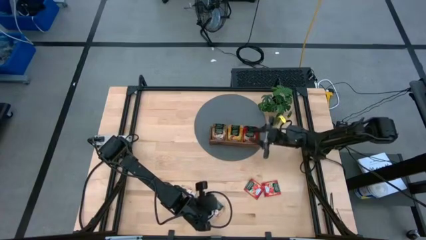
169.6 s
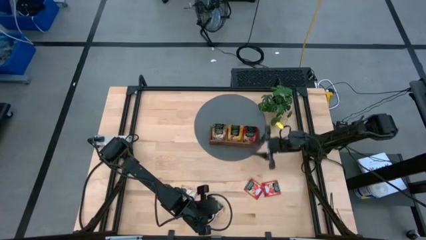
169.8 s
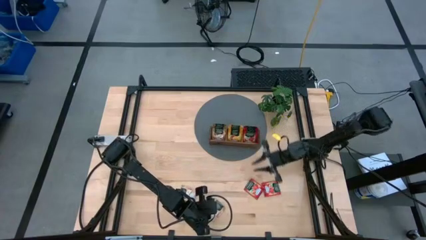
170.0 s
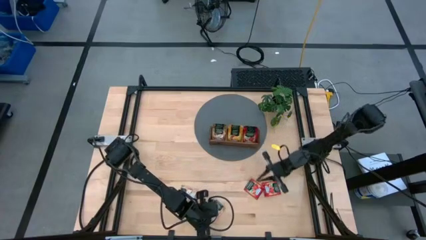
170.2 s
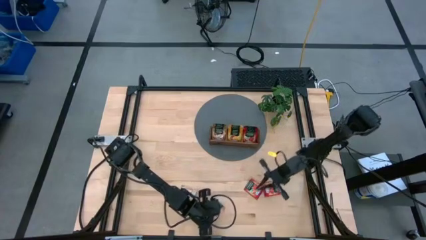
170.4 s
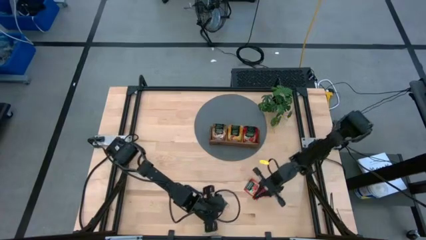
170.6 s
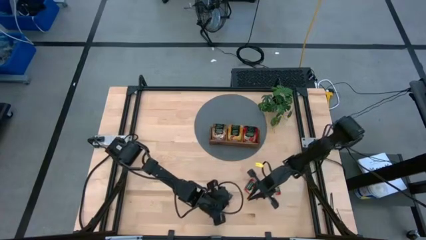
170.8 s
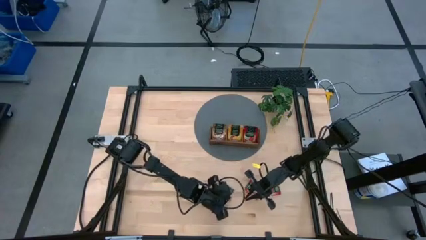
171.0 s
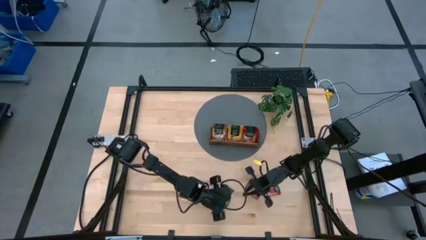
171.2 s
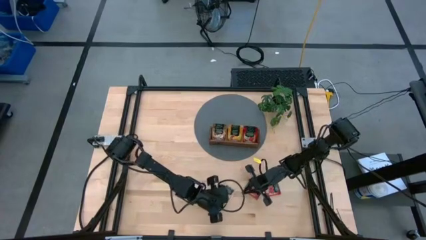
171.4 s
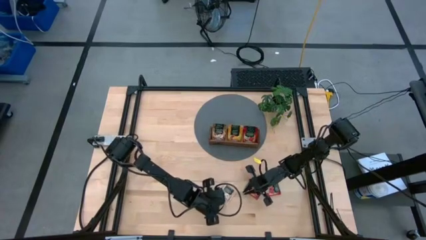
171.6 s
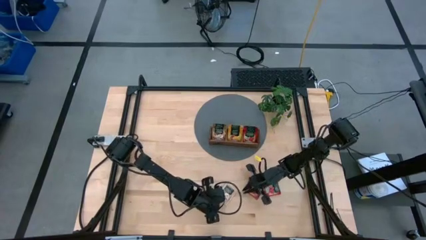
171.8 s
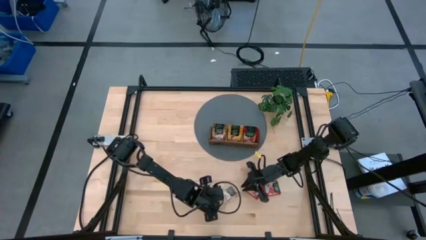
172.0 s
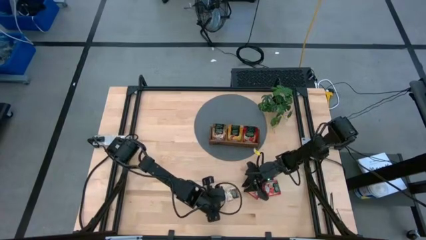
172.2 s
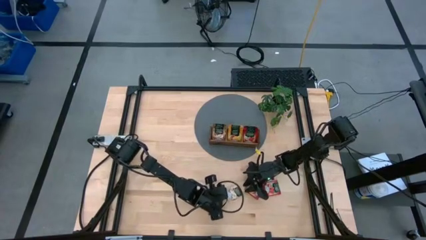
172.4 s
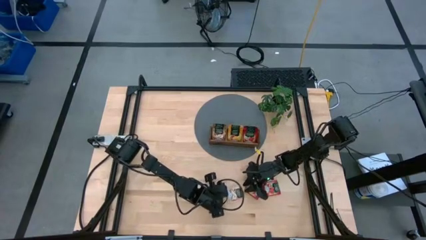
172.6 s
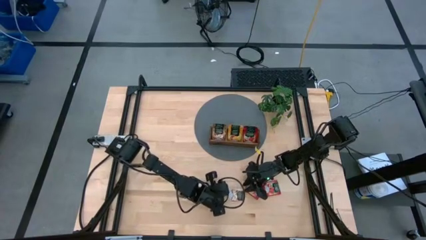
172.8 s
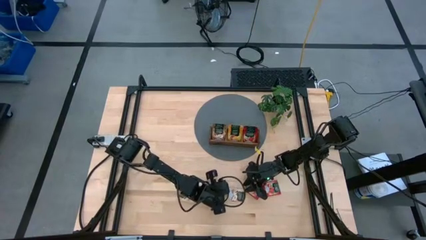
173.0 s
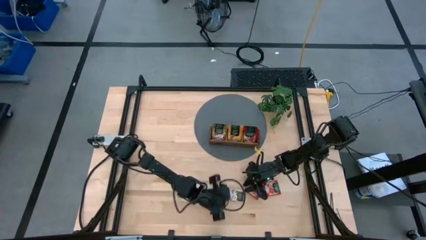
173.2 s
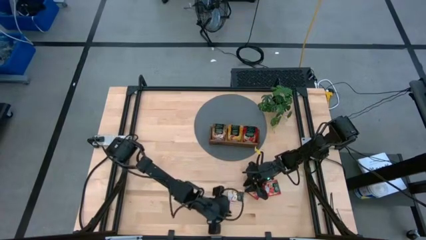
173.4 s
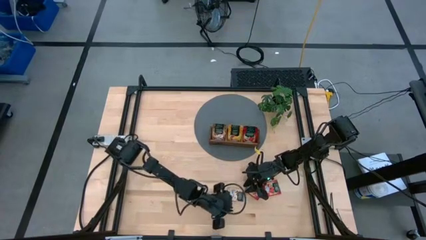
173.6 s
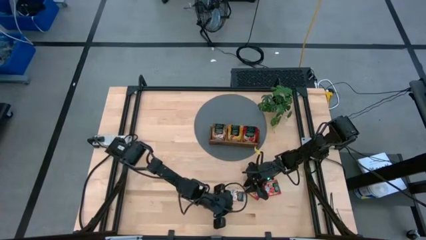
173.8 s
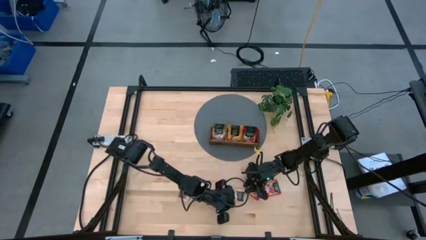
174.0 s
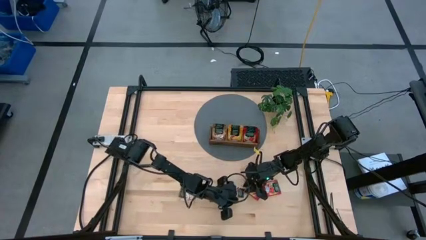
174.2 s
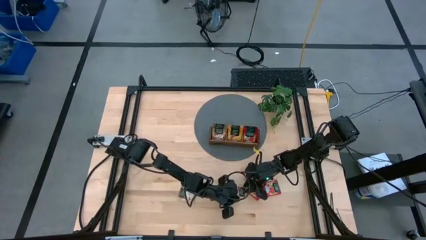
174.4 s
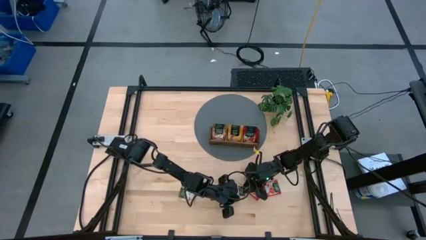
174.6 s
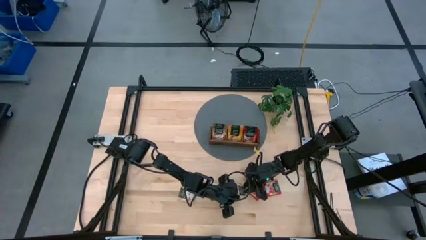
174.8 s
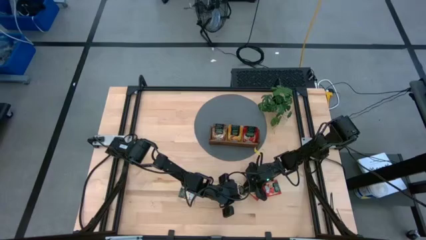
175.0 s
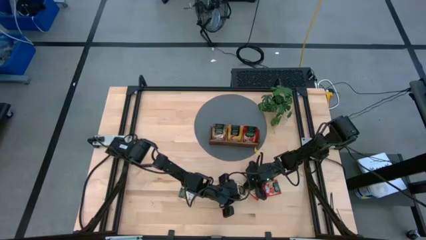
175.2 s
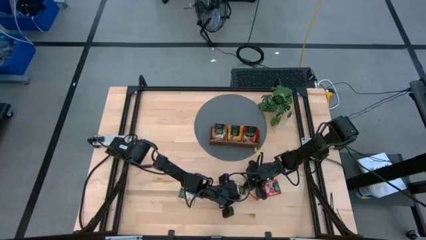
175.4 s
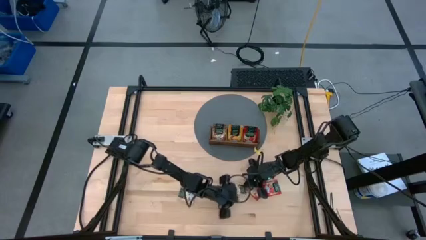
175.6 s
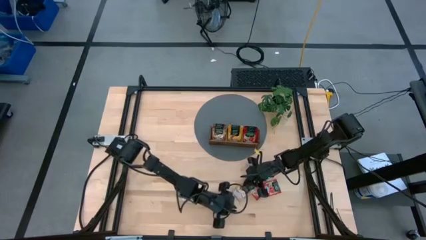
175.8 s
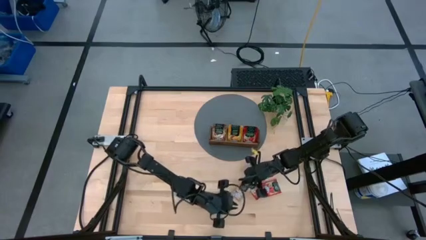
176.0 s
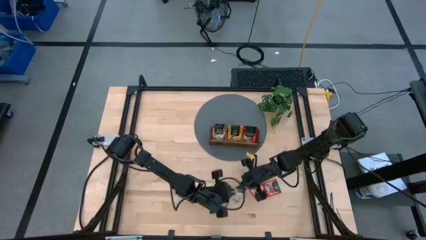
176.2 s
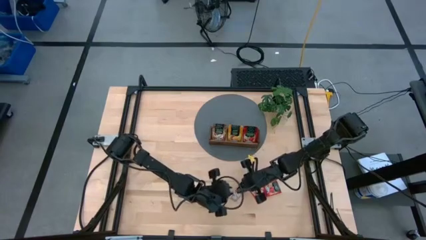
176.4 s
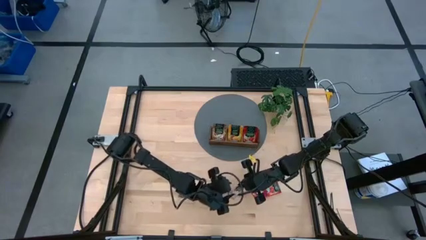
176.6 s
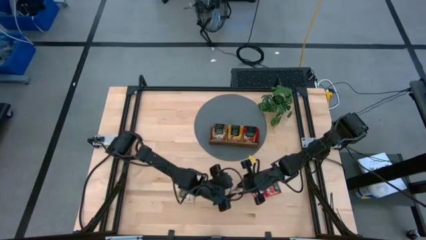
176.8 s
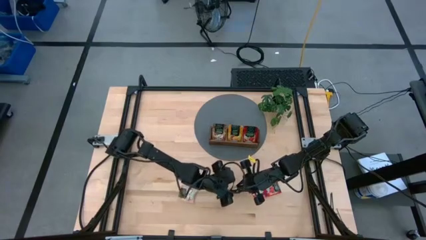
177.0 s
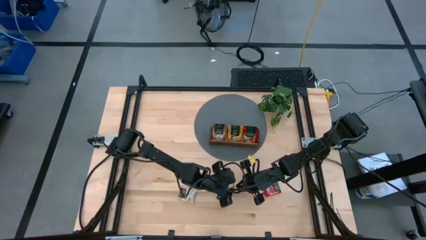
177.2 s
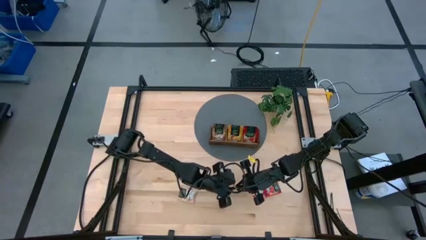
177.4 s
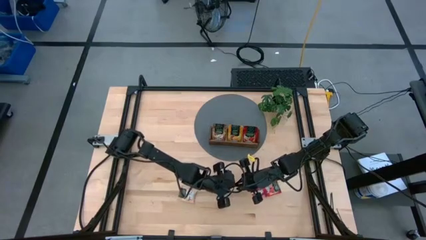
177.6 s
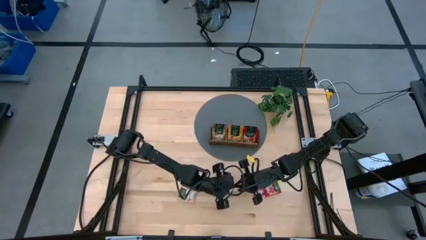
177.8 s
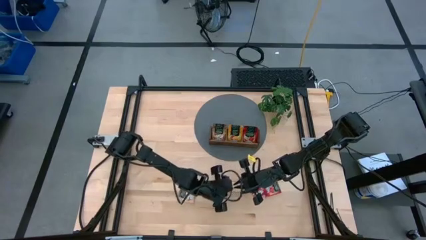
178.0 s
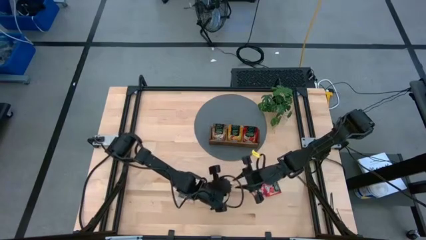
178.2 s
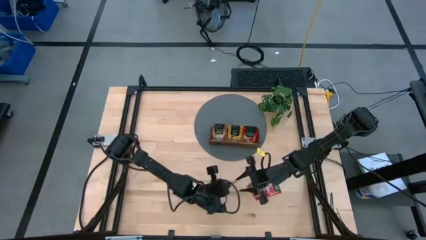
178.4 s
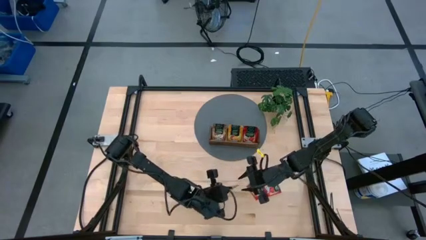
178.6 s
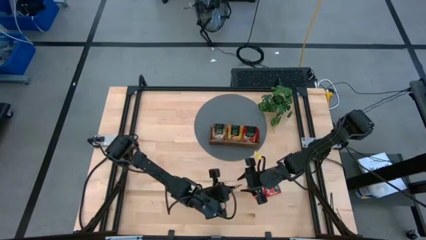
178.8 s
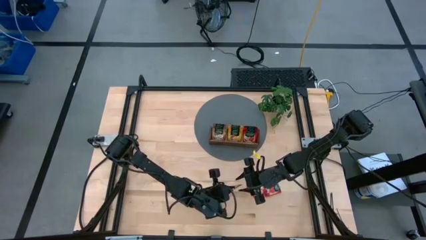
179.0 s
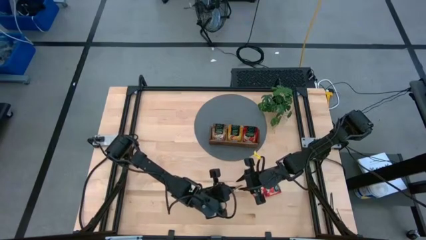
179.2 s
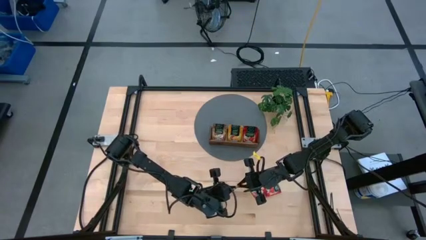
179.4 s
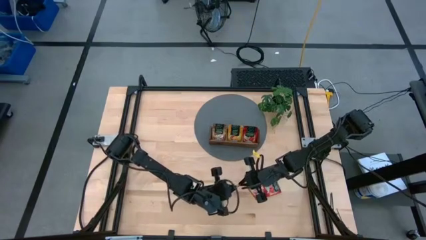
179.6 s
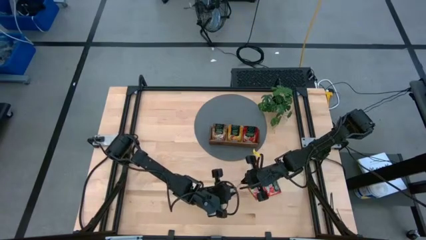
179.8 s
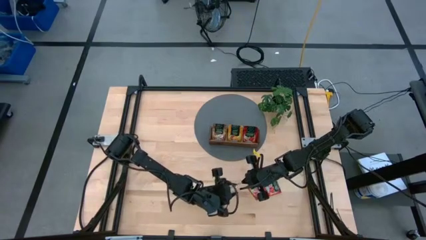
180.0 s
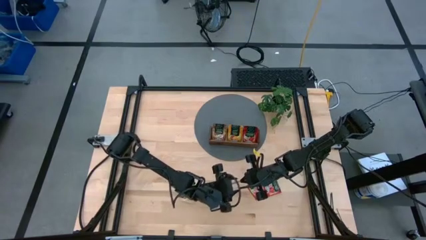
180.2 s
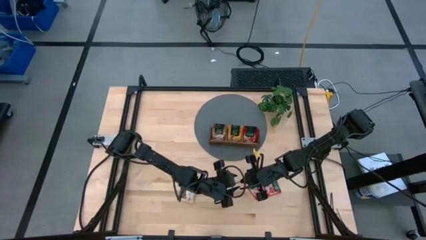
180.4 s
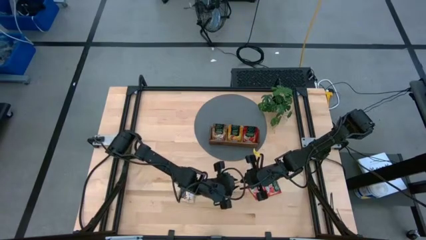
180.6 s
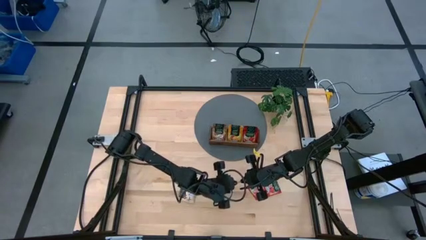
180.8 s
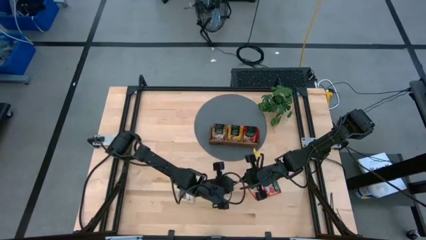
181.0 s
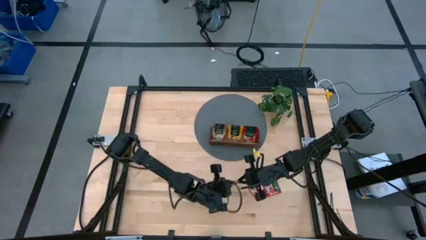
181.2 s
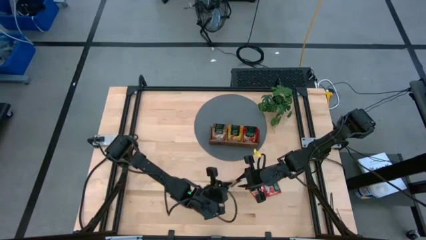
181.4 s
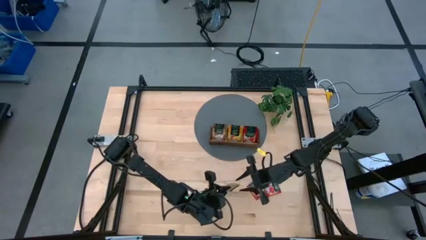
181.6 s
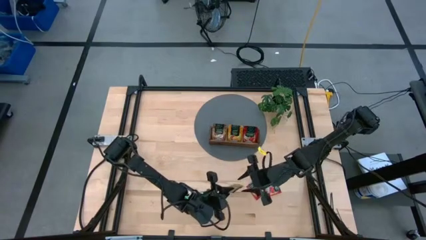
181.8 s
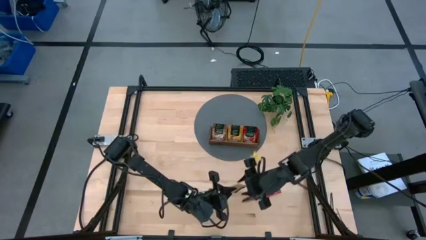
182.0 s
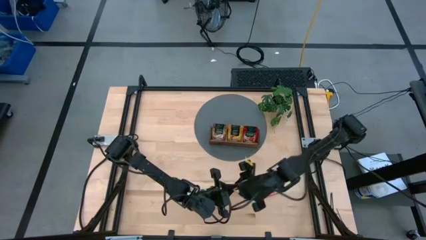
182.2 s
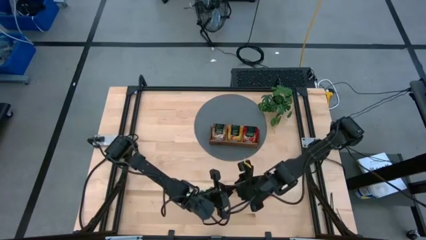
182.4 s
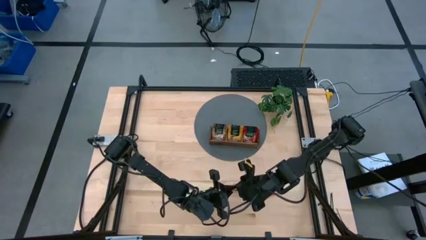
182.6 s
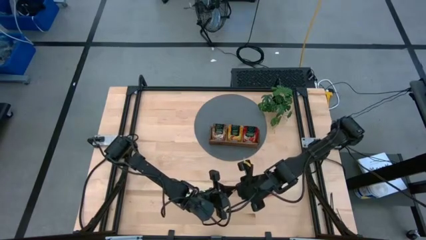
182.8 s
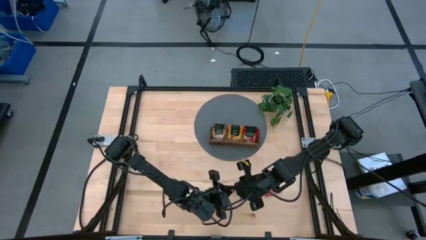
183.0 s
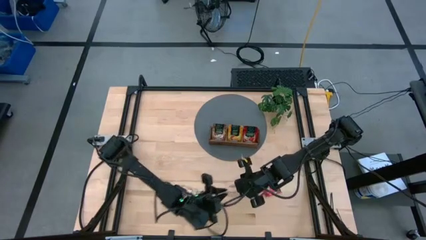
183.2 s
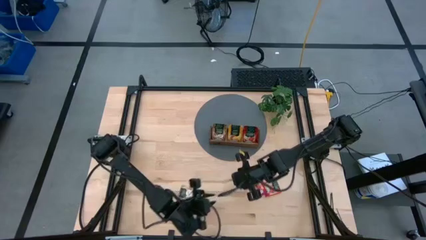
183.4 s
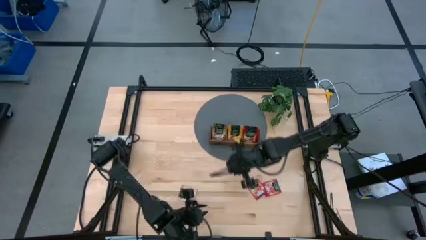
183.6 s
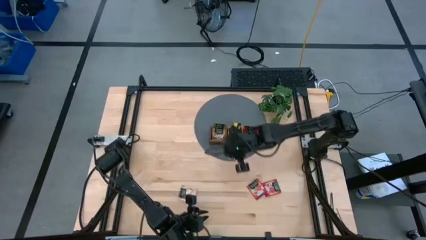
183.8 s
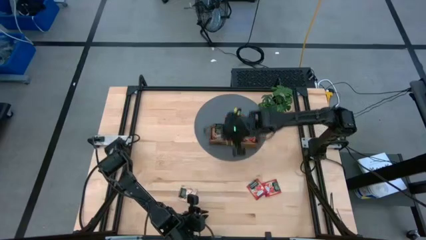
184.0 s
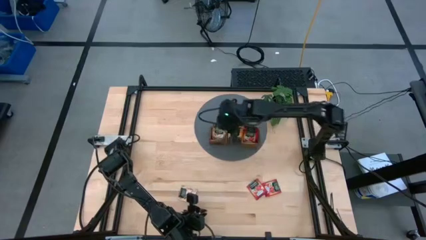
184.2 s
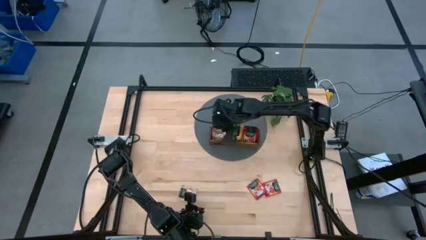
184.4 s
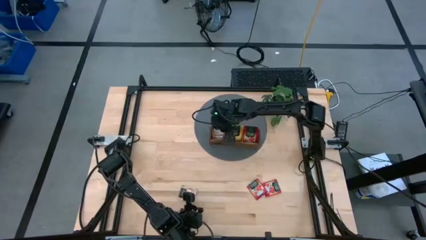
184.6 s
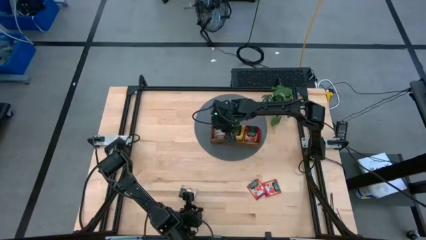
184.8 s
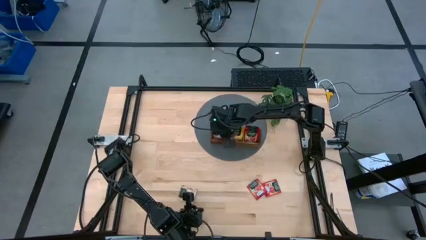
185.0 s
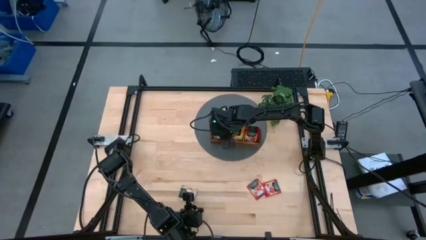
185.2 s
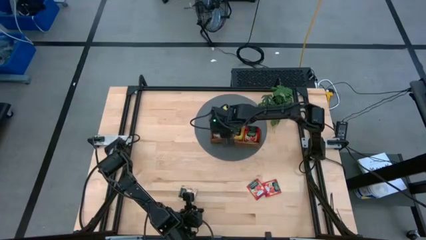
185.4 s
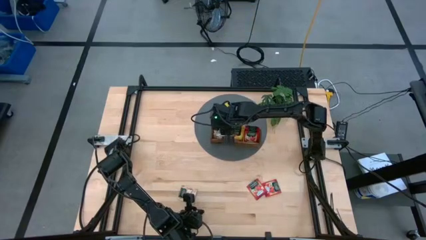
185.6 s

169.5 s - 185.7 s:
Task: Pick & Place Tea
Put the brown tea bag into the left section of the wooden organizer
